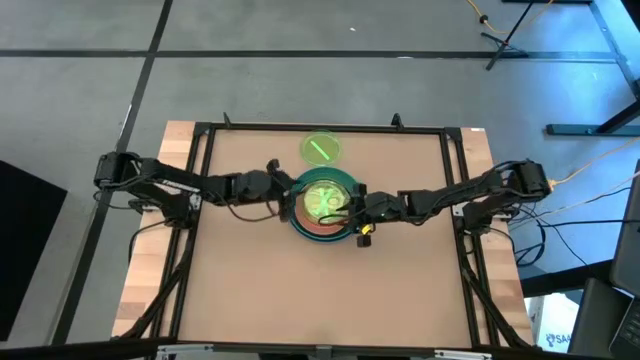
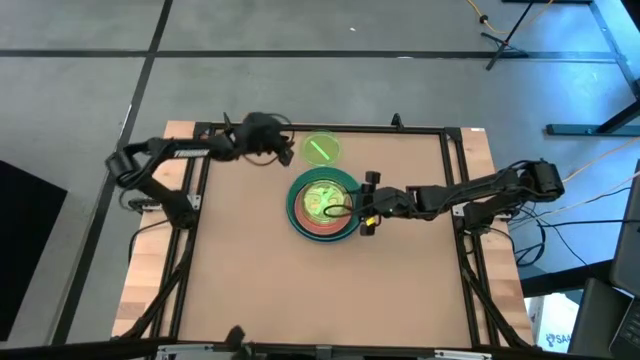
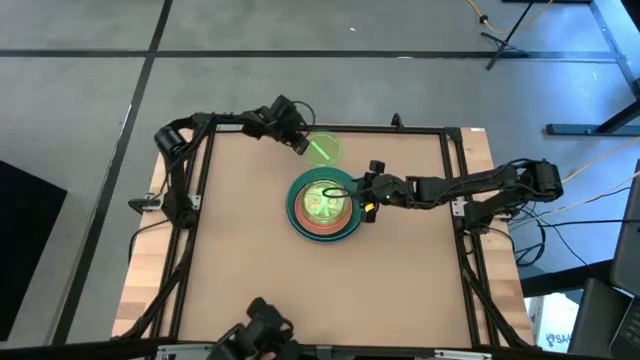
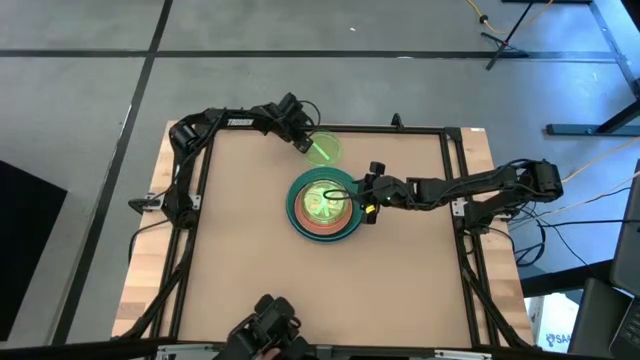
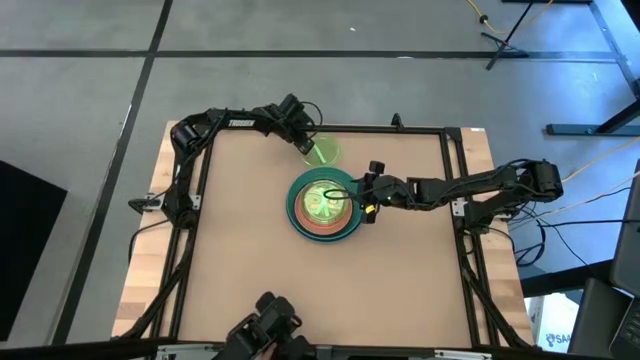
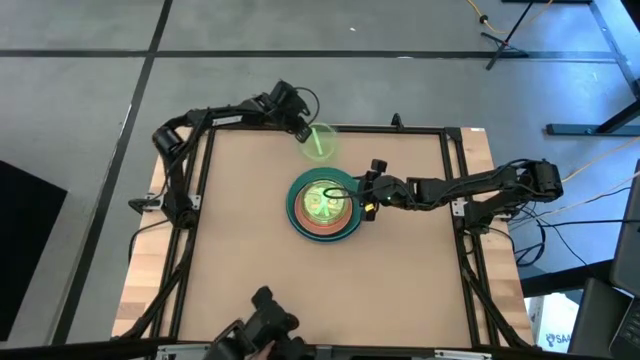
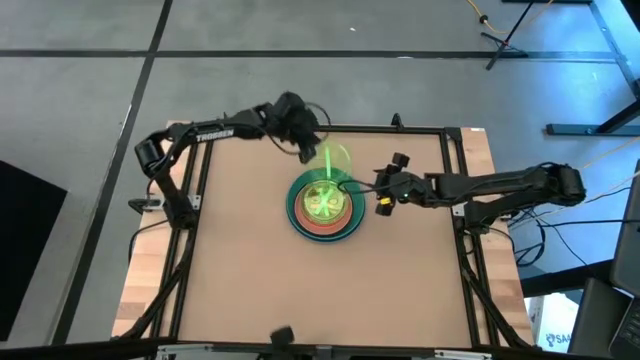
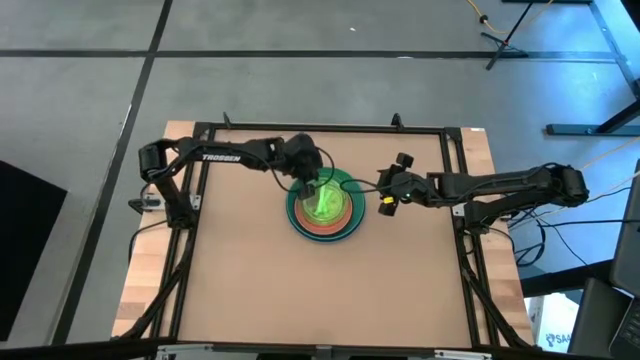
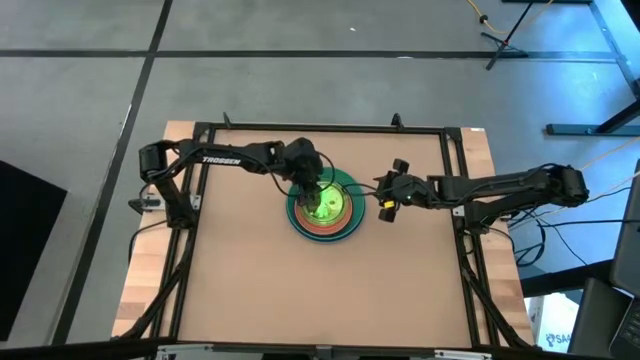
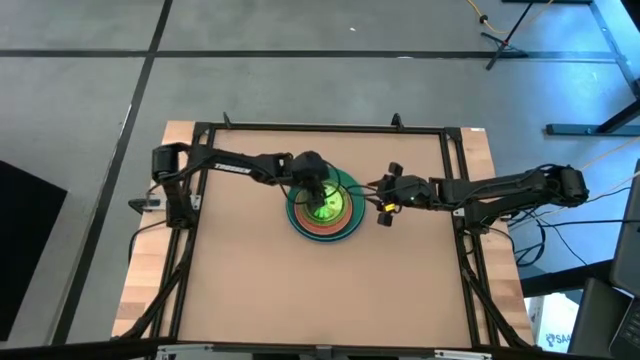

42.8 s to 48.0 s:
Task: Stack plastic plates
Stack the light green plate on top of the light green plate

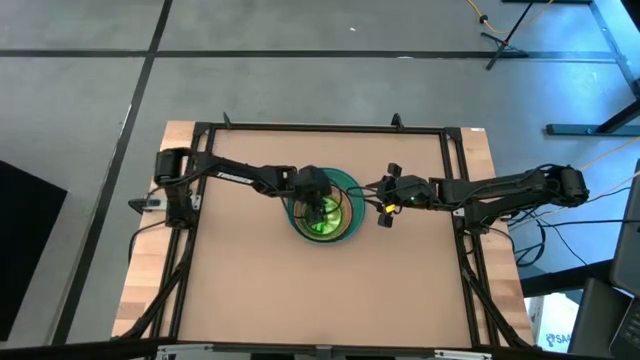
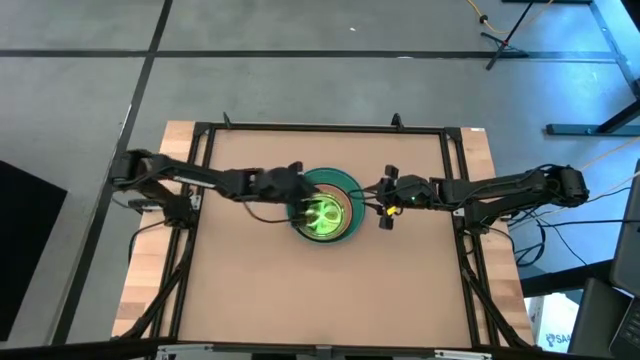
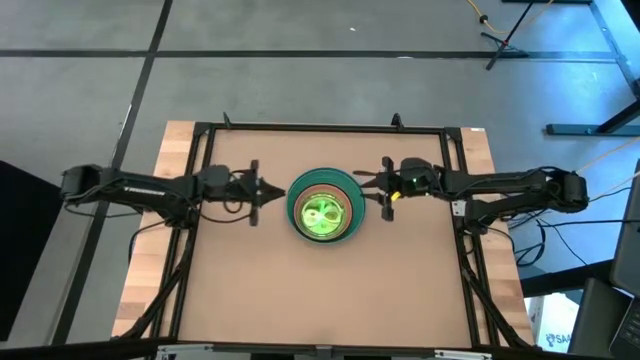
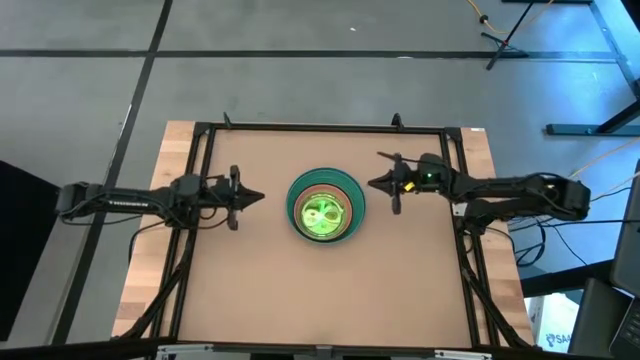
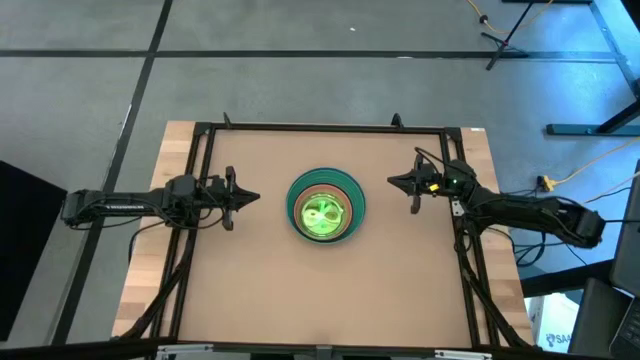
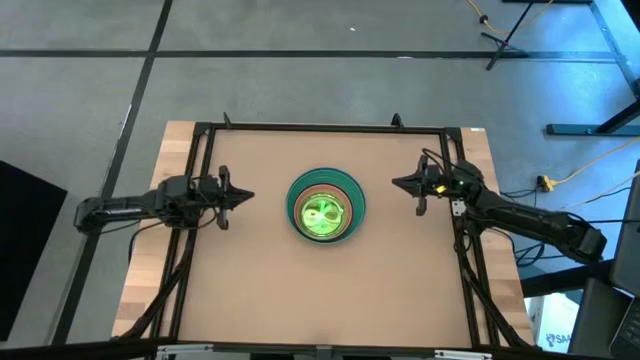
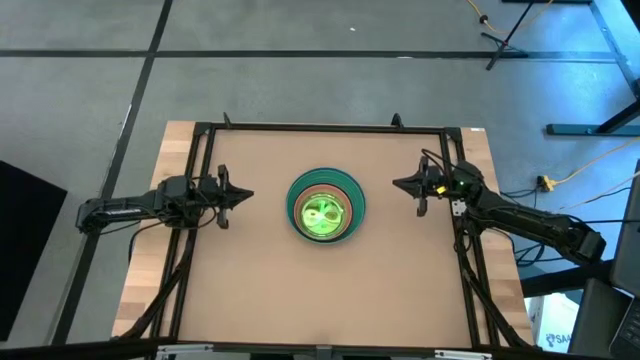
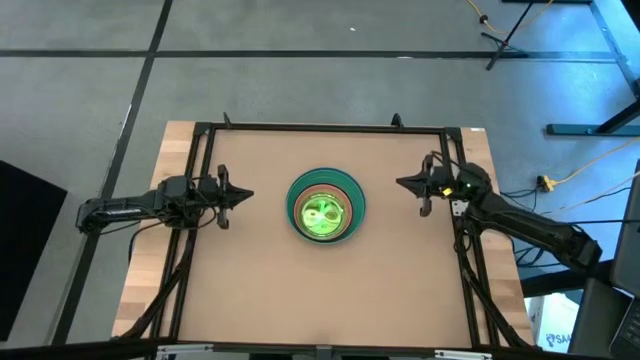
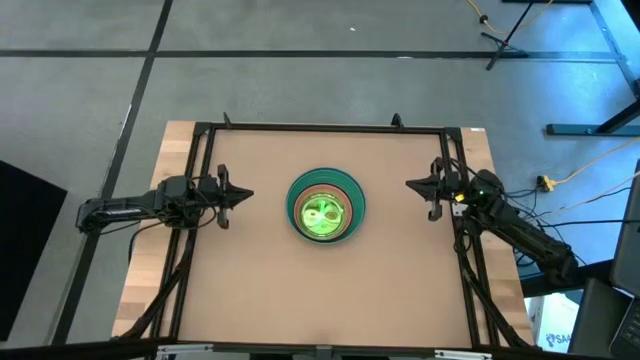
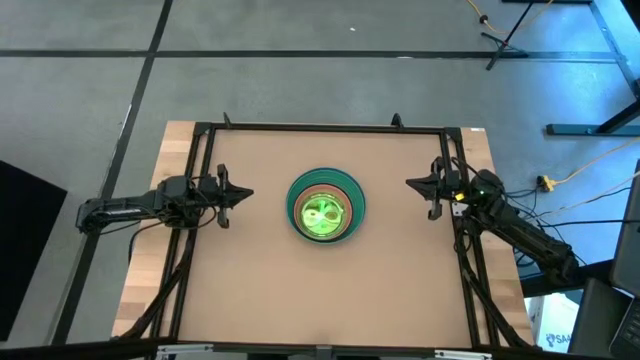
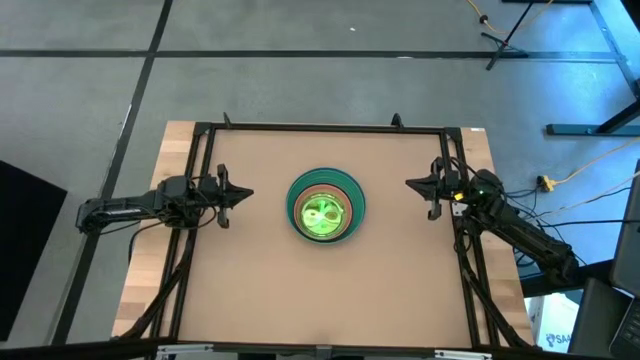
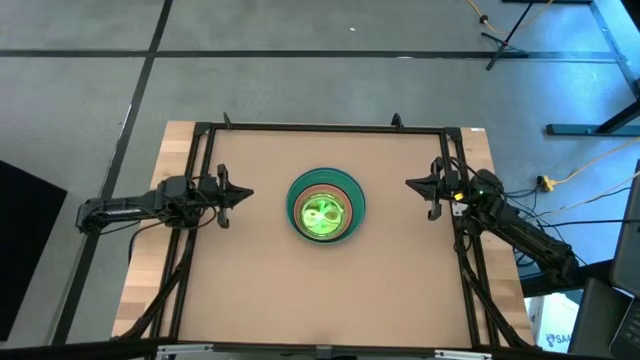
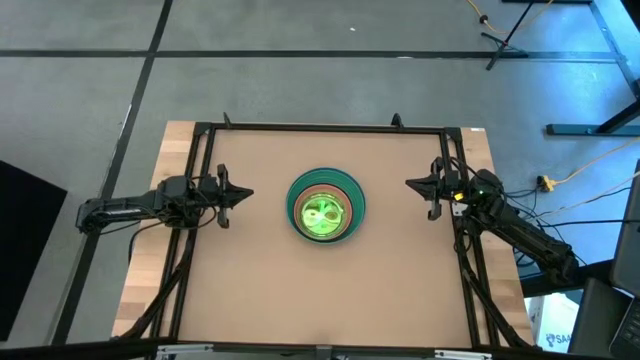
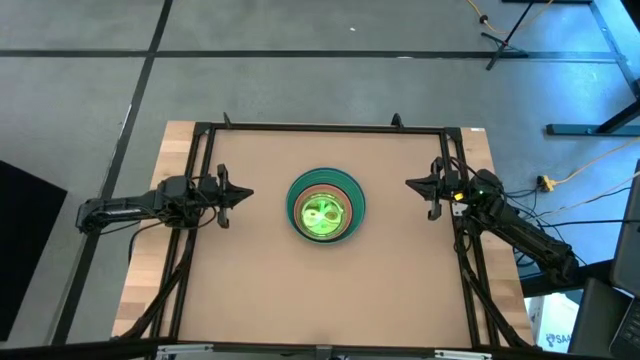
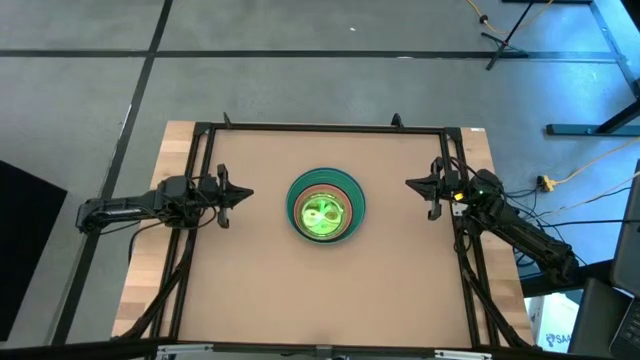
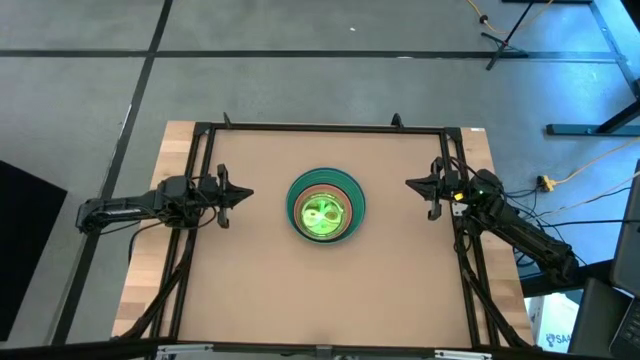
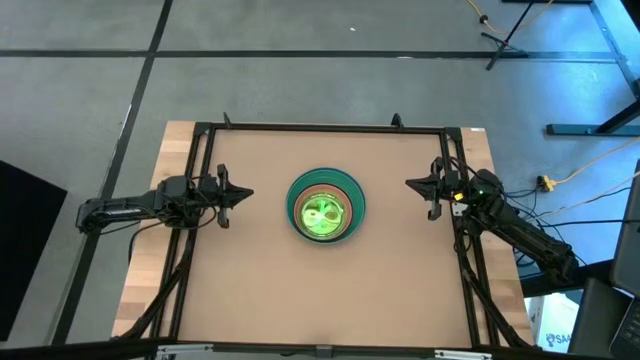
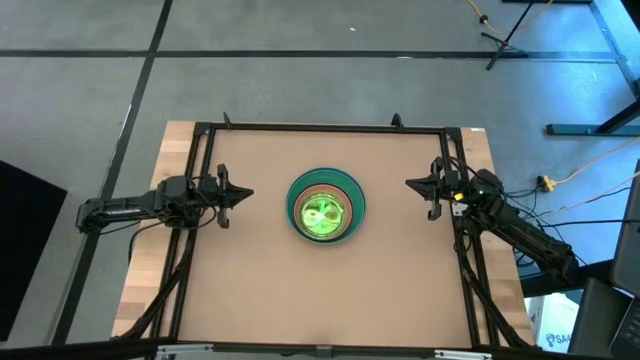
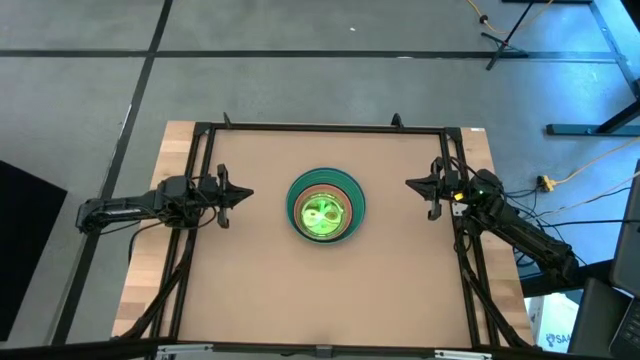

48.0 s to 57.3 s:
Return to Home Position

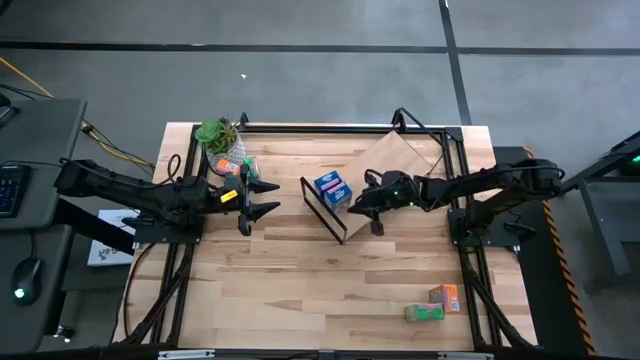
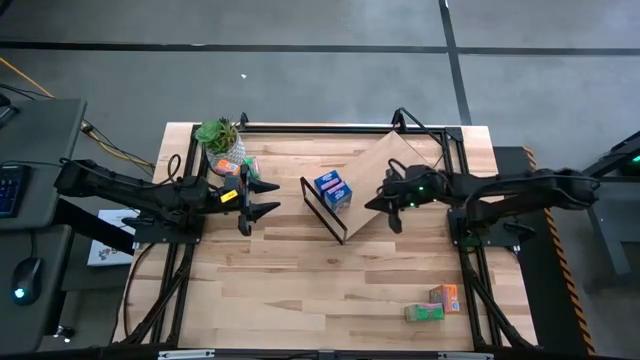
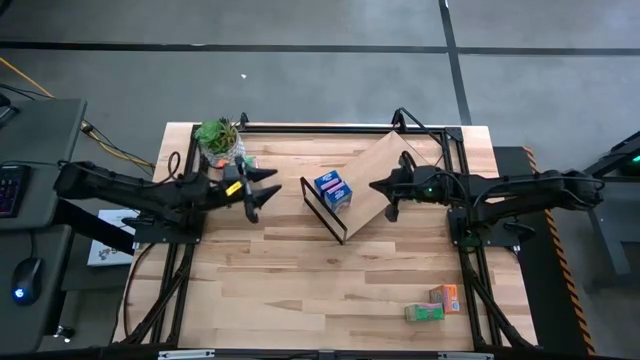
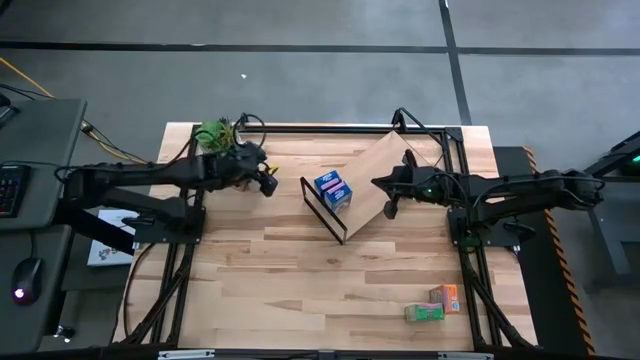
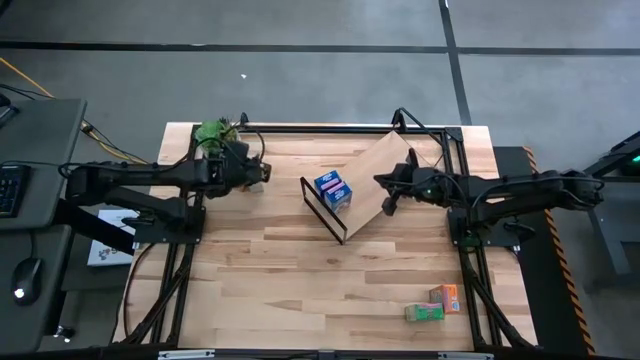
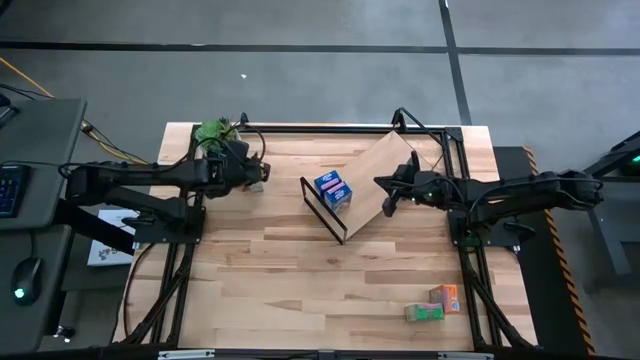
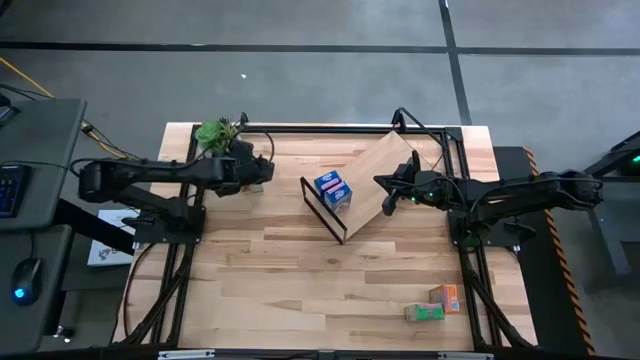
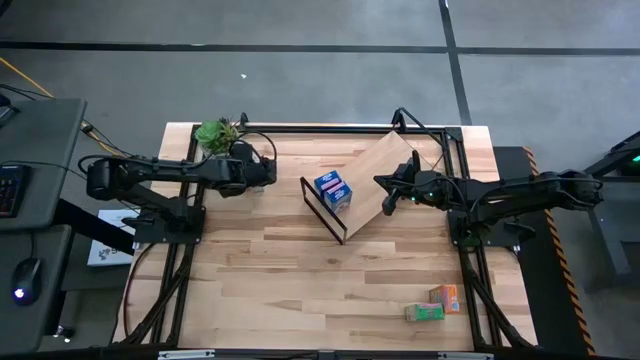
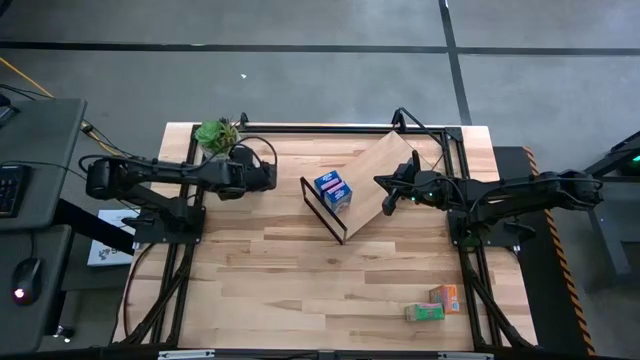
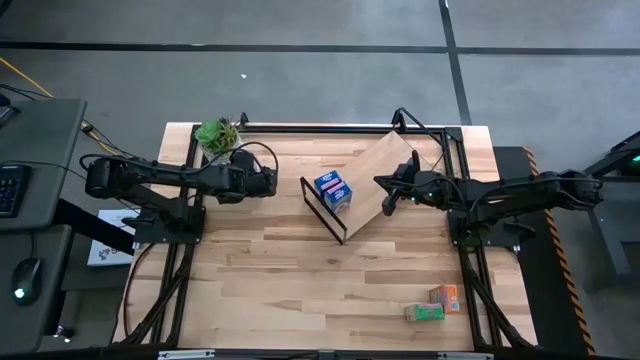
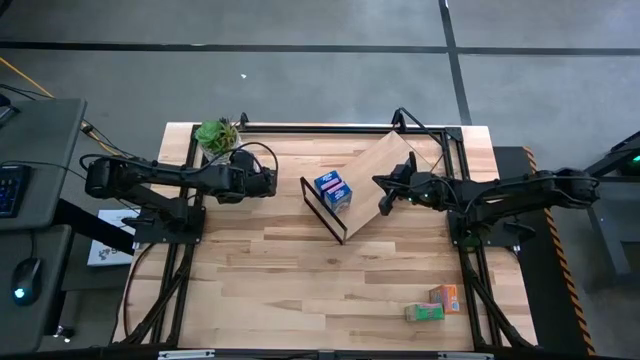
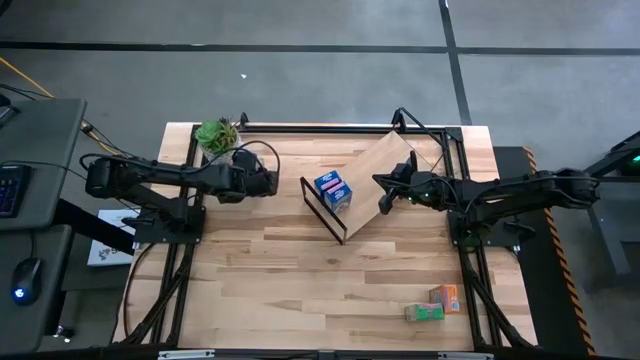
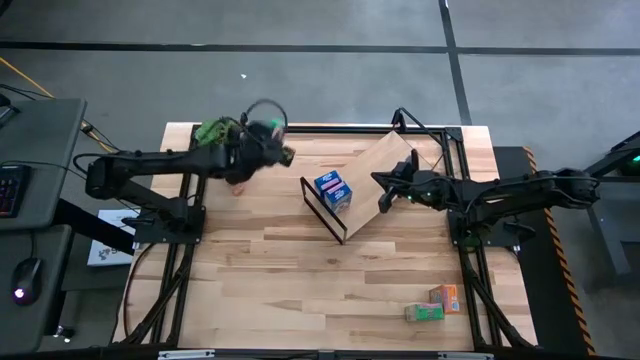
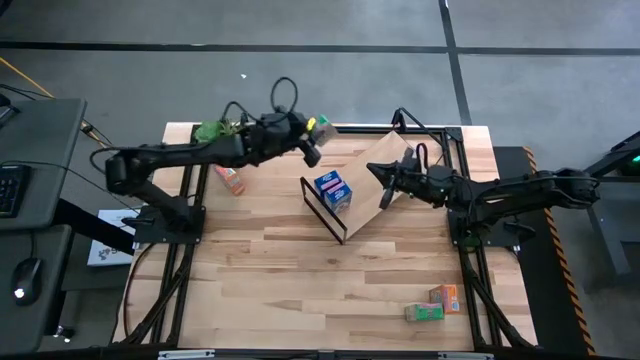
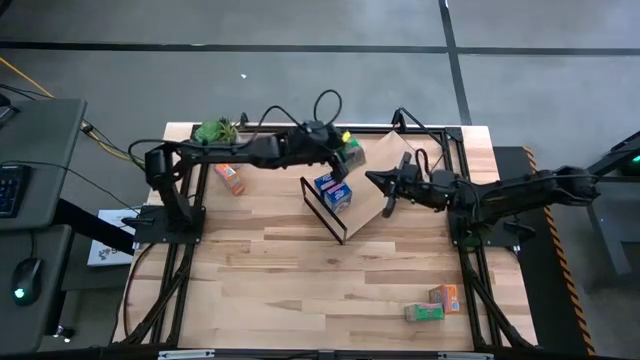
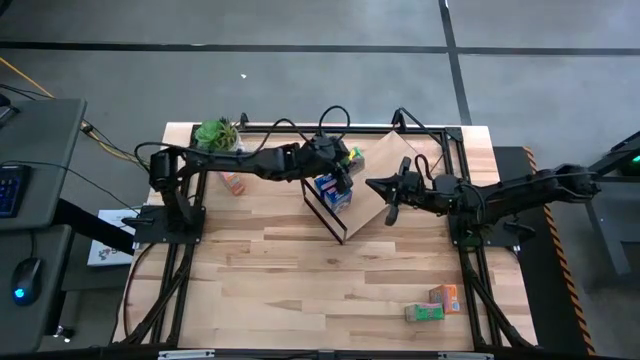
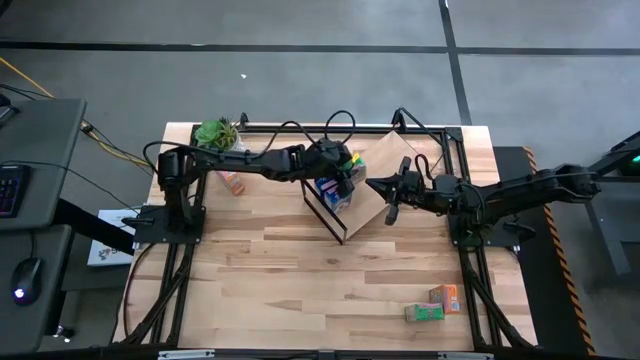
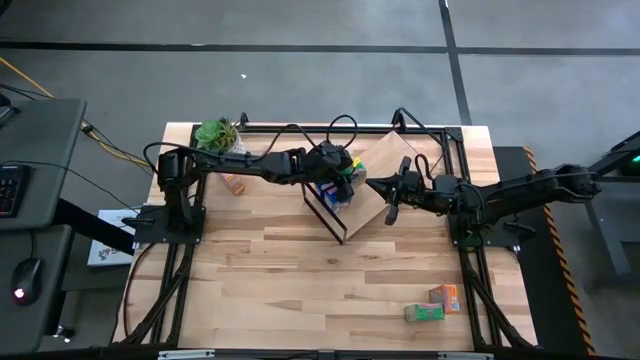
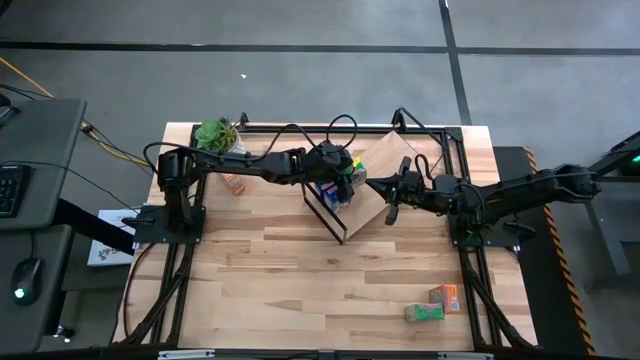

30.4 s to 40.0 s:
Task: Stack cereal on shelf
Put the top green cereal box on the shelf
